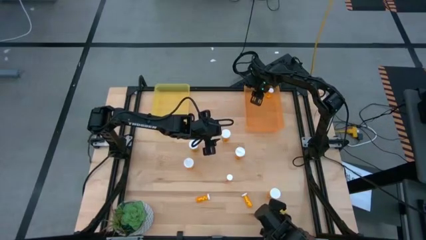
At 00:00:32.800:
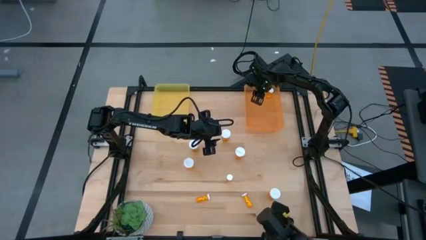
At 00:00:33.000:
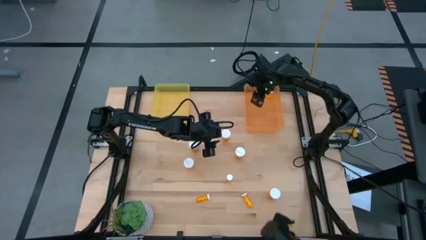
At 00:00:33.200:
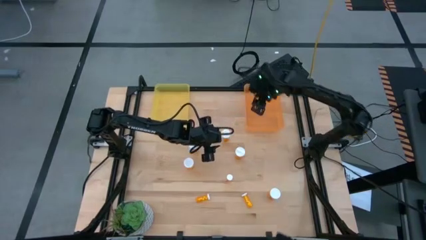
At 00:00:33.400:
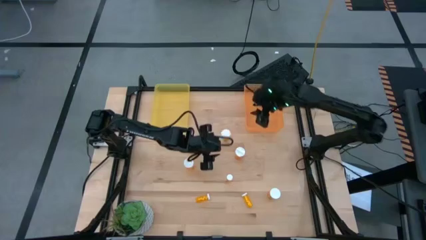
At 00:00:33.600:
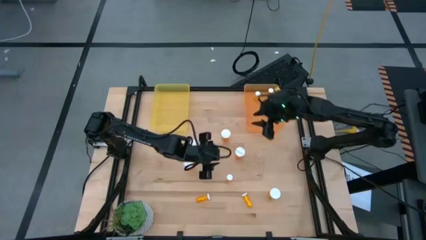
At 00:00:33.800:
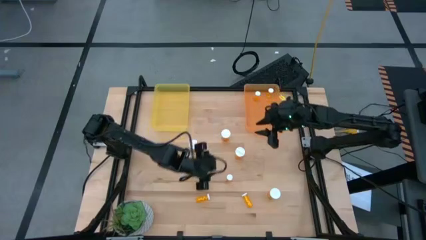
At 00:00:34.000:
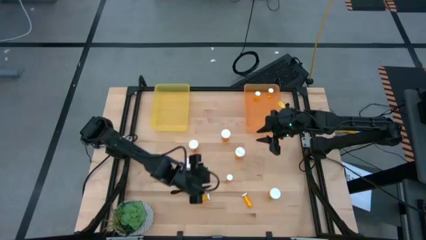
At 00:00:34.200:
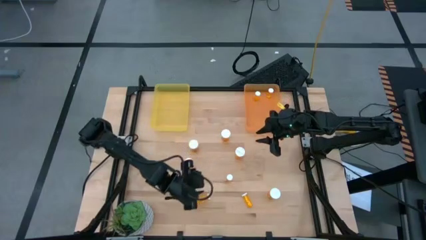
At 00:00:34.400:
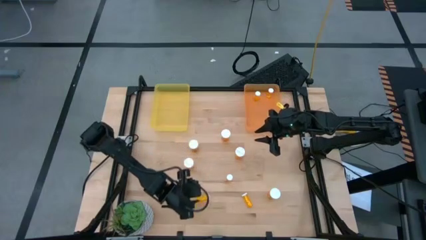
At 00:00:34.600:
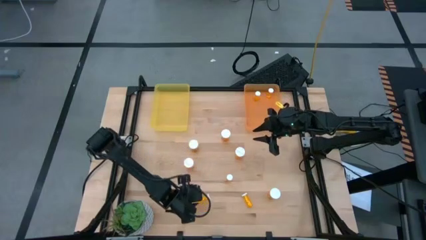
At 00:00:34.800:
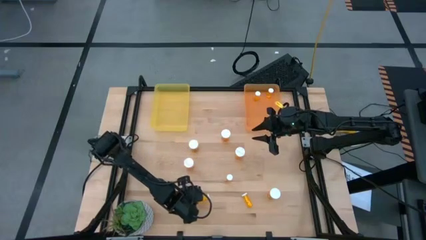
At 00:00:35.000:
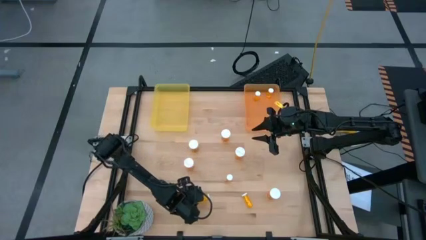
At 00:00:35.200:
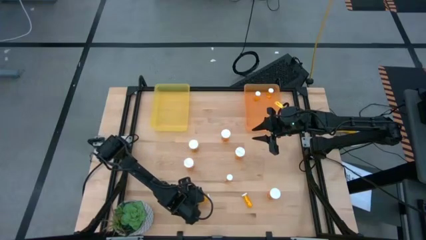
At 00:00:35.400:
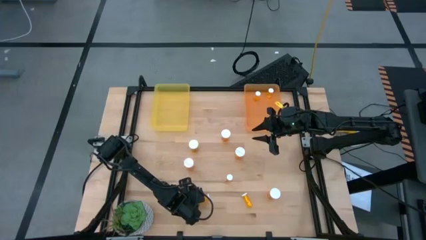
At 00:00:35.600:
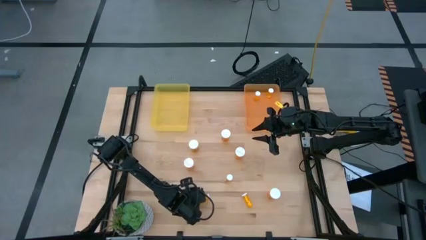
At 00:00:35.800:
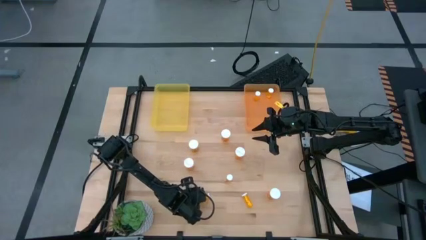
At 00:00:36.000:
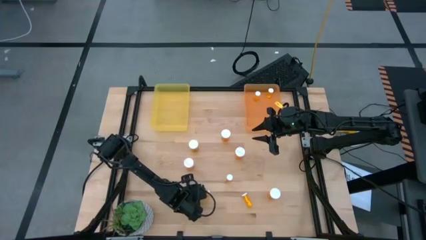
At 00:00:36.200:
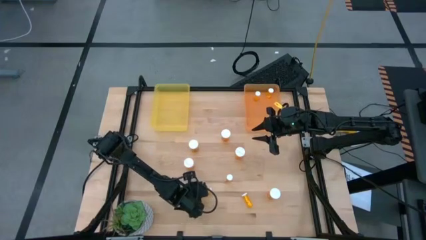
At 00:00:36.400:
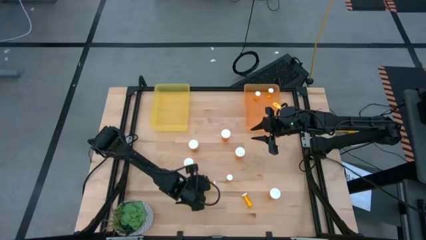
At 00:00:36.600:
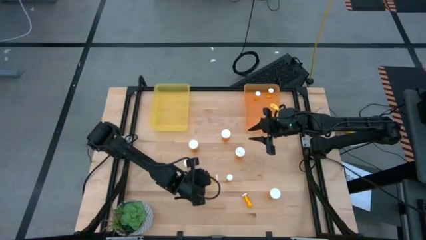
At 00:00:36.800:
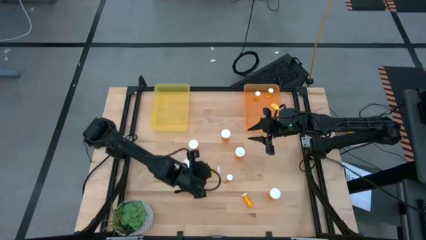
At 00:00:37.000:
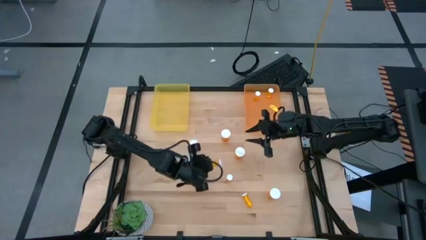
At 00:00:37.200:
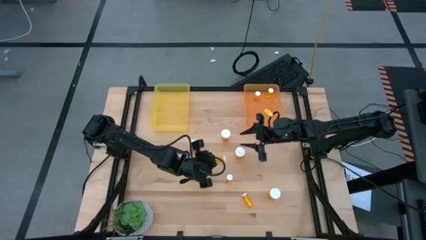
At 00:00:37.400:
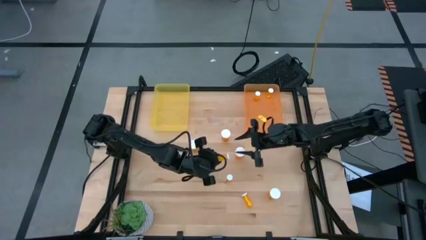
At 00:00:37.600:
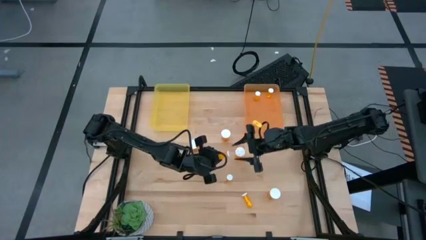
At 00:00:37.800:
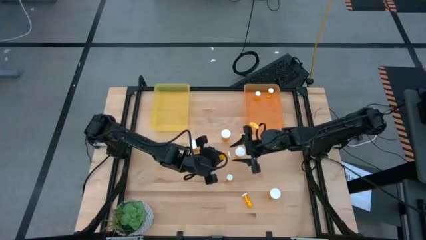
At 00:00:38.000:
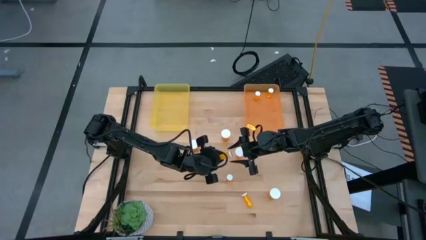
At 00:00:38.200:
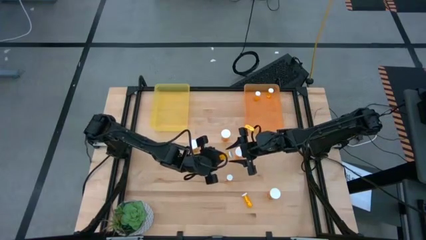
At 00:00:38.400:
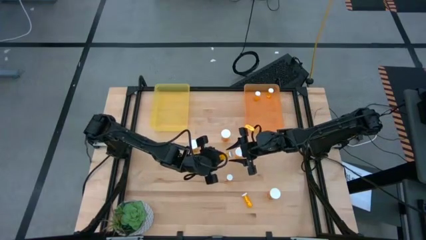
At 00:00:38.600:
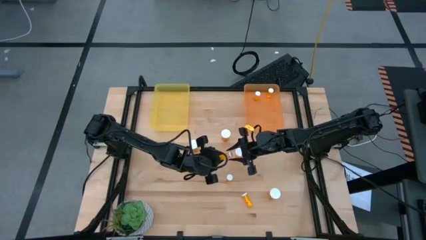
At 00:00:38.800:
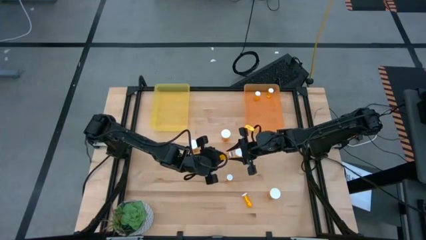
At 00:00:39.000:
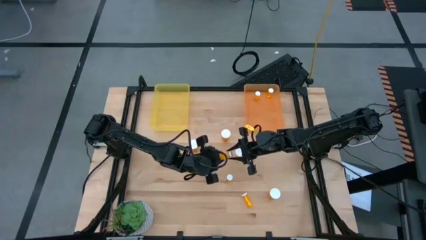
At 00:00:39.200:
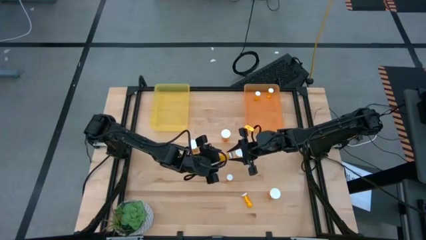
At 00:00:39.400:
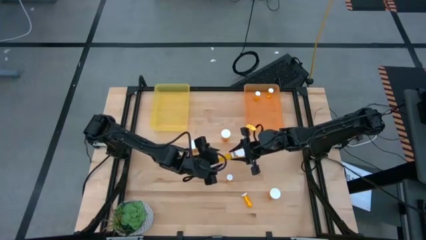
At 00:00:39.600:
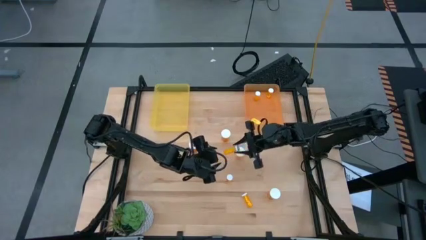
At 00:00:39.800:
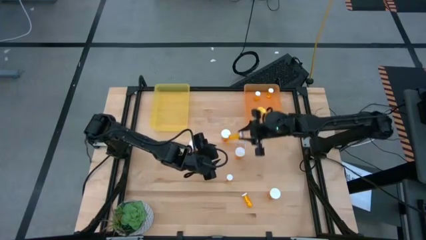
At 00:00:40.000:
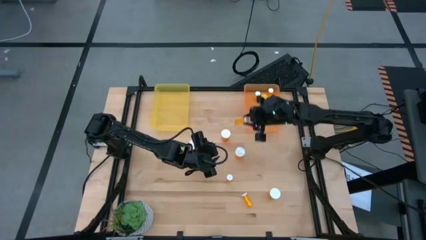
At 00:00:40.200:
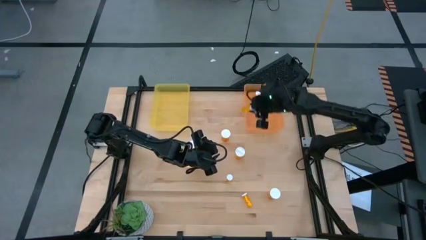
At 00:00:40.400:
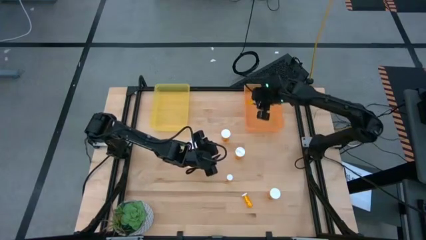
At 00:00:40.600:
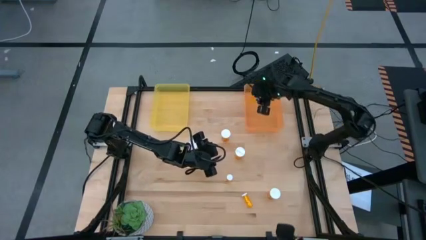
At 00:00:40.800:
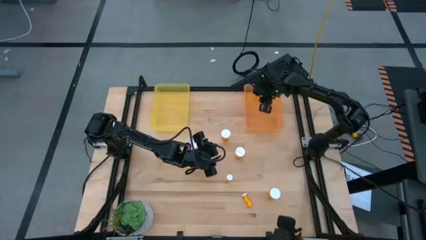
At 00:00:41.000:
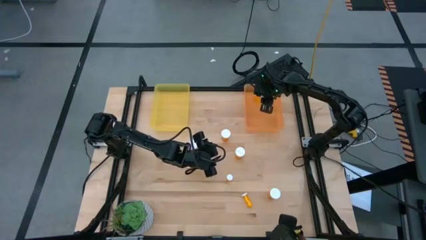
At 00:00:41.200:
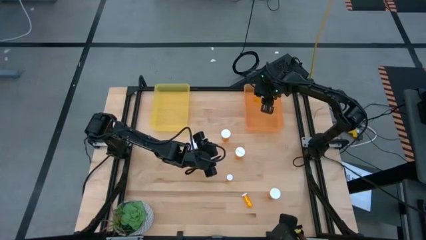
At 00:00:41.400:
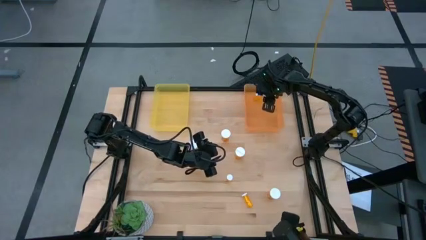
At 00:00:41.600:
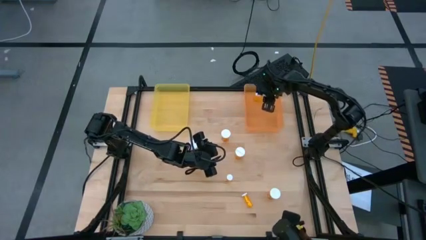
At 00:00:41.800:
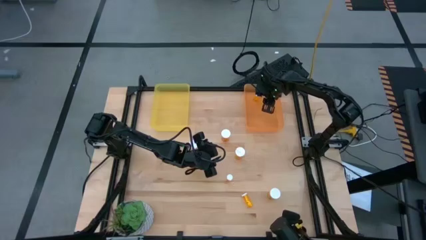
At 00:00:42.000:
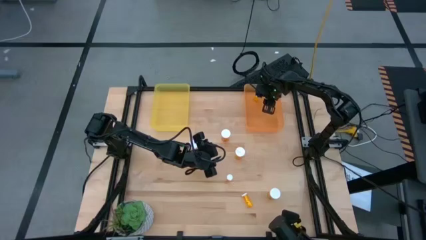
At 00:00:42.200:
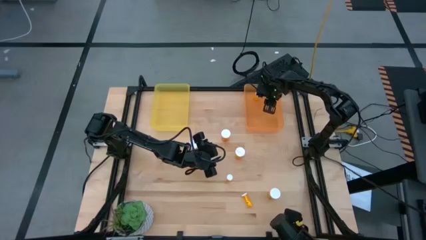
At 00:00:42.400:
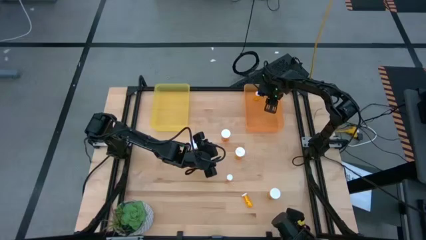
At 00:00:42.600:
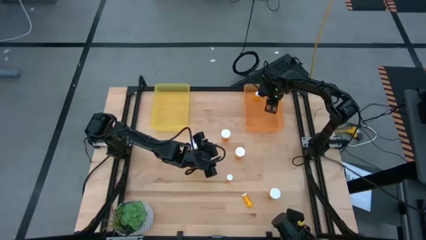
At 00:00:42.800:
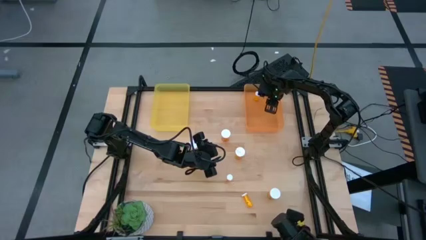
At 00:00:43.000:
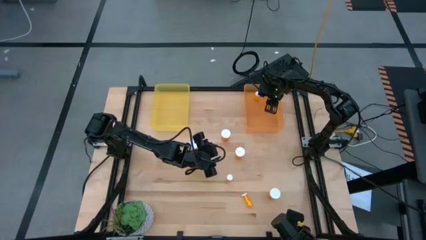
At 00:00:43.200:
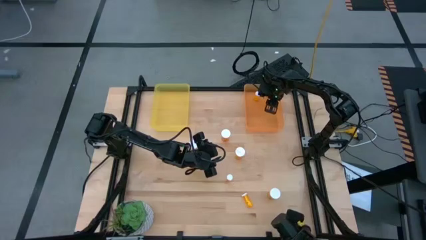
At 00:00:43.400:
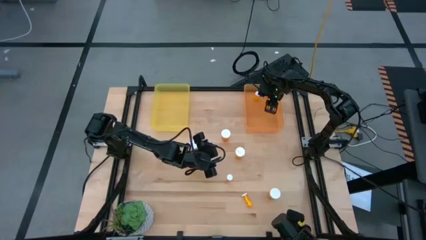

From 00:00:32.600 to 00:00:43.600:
Task: Pick and place medicine bottles into bin by pill shape (circle, oval)
Put the small orange pill bottle into the orange bin
